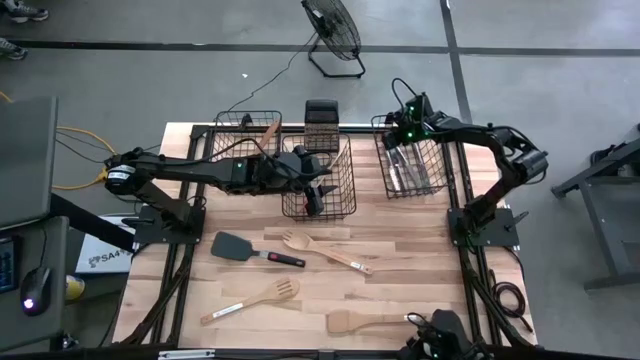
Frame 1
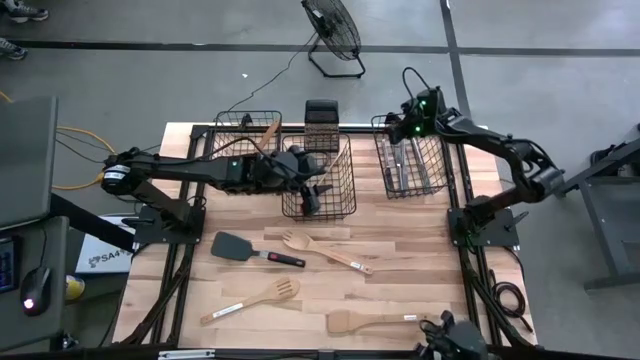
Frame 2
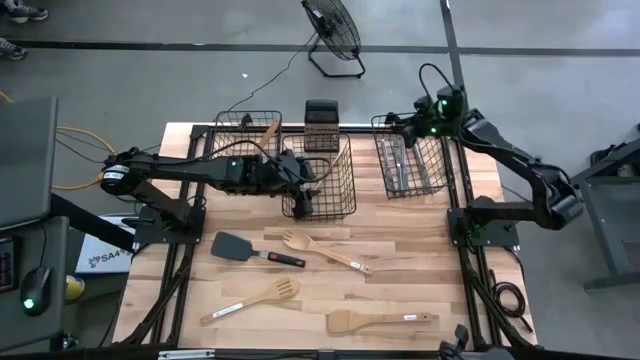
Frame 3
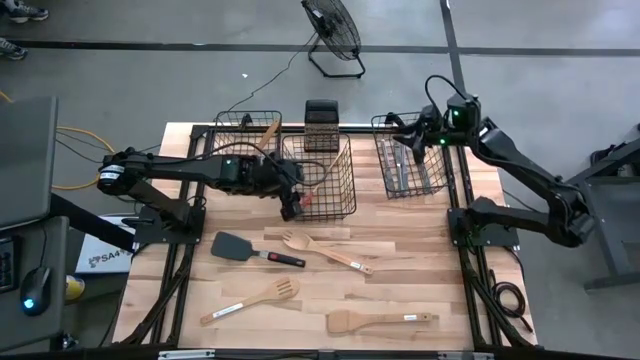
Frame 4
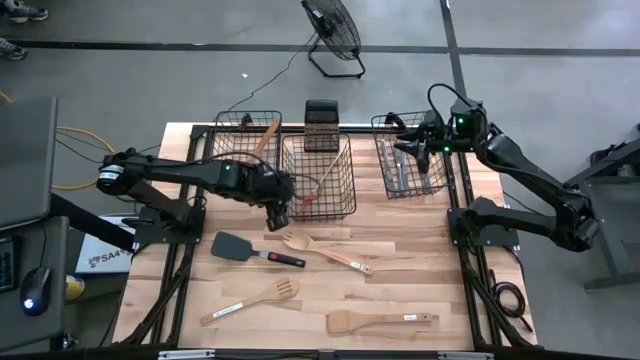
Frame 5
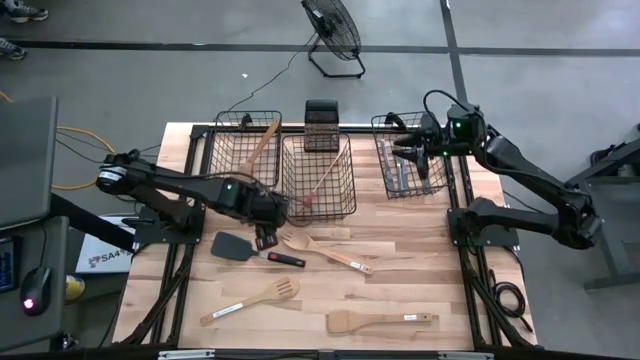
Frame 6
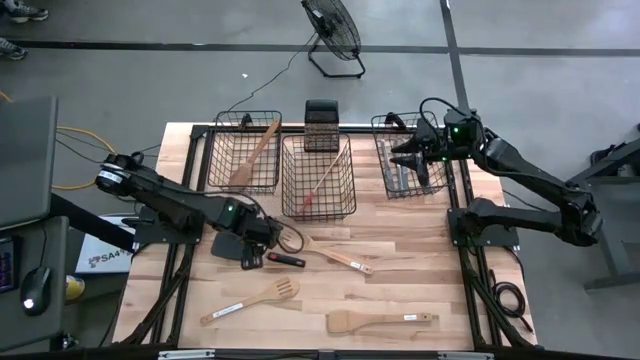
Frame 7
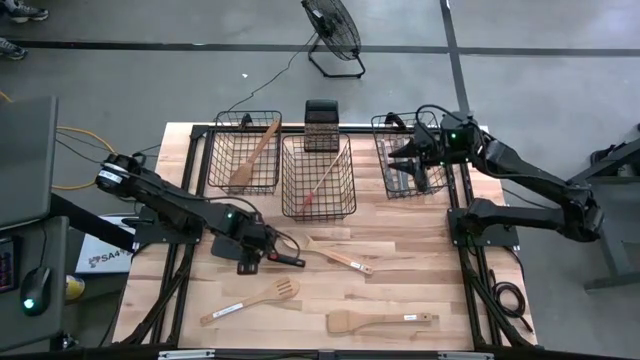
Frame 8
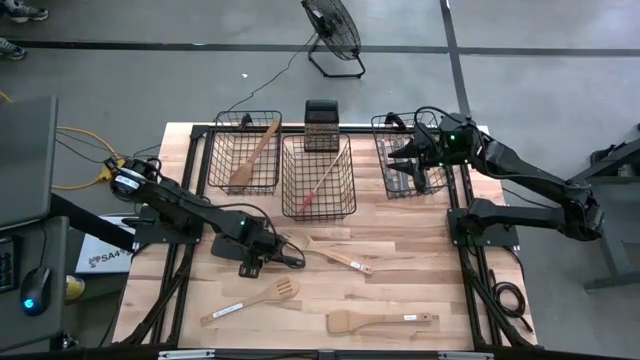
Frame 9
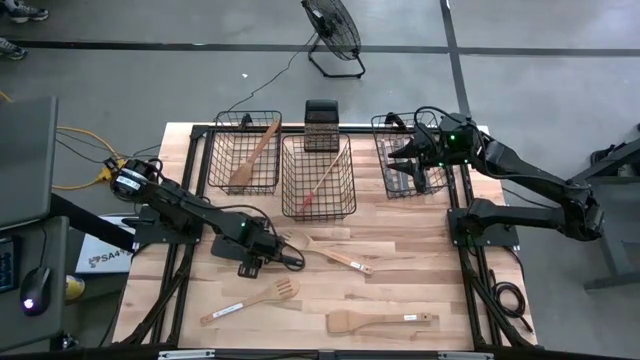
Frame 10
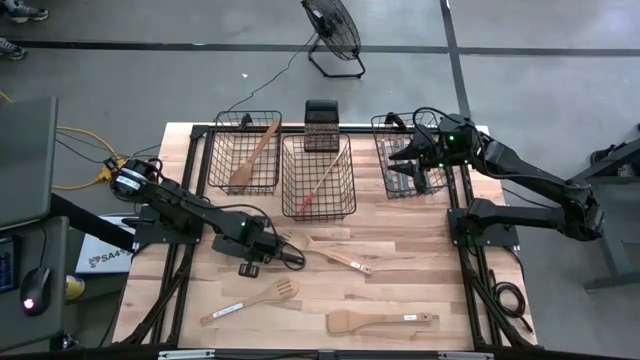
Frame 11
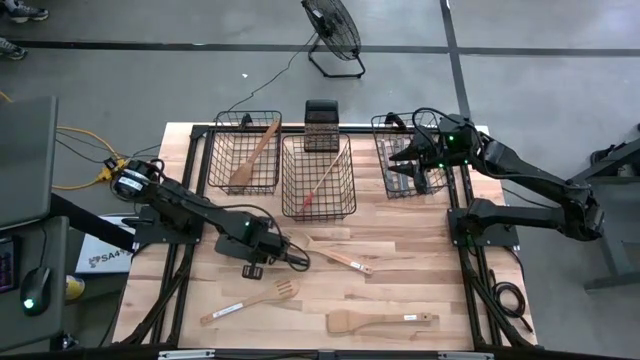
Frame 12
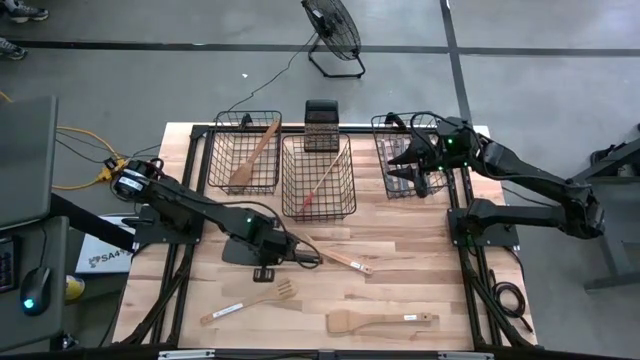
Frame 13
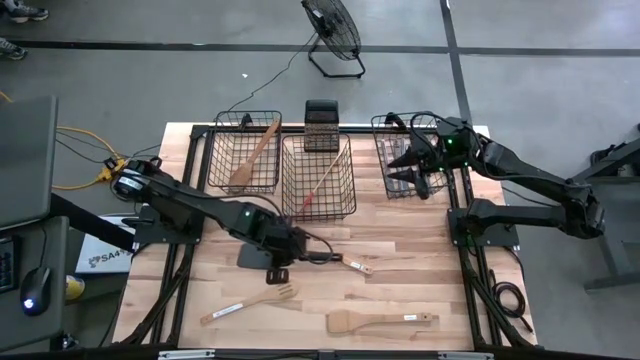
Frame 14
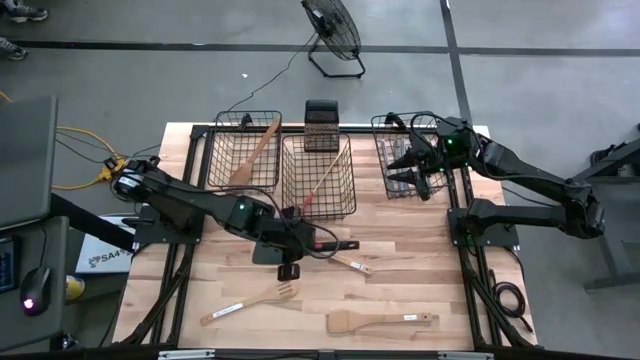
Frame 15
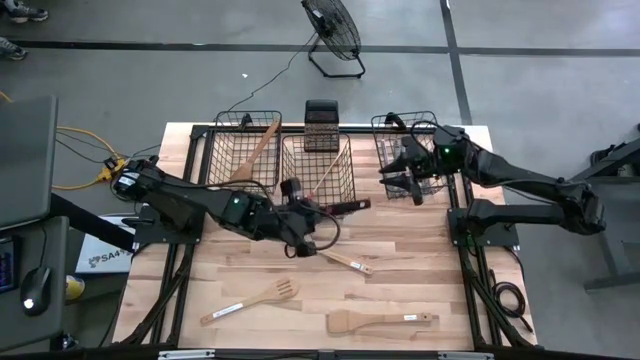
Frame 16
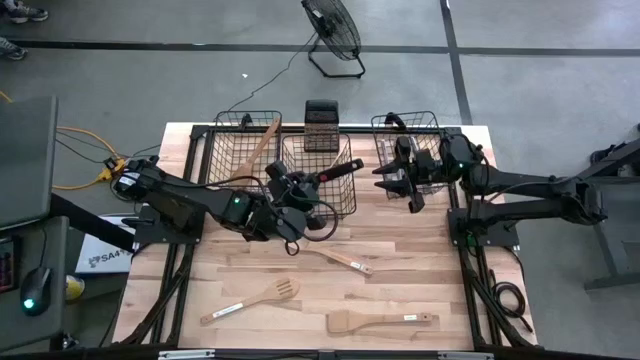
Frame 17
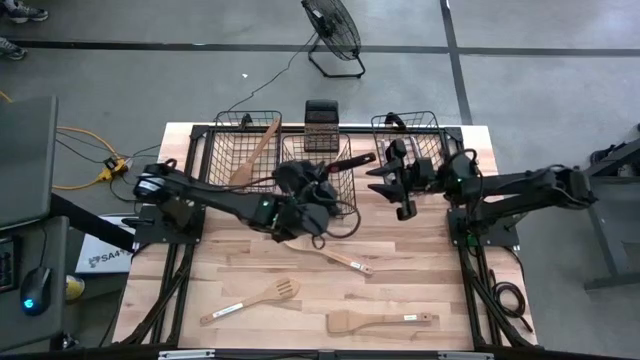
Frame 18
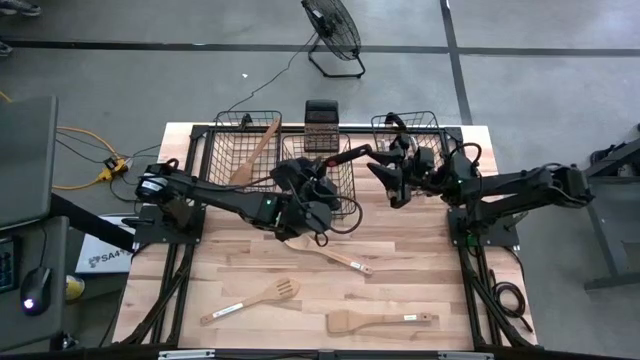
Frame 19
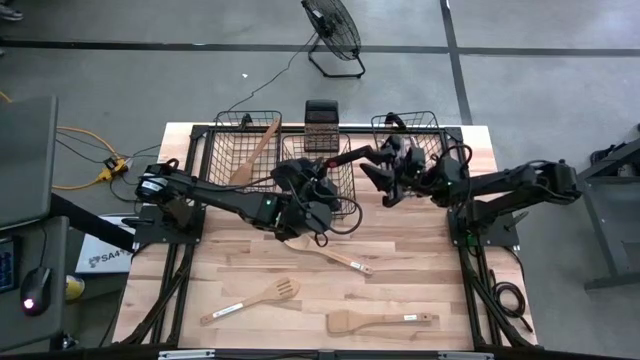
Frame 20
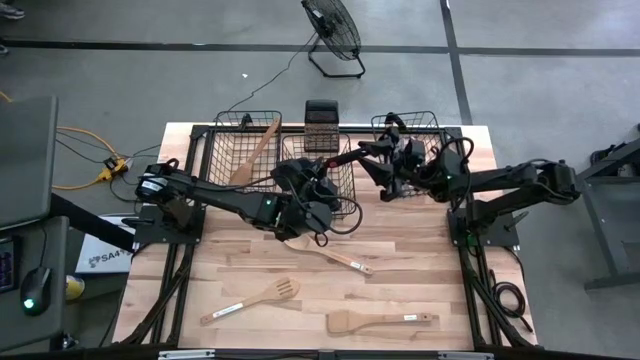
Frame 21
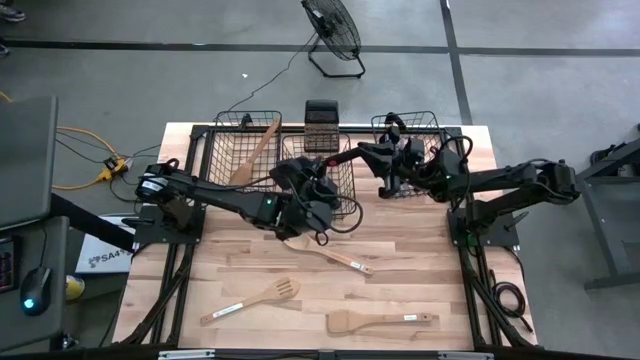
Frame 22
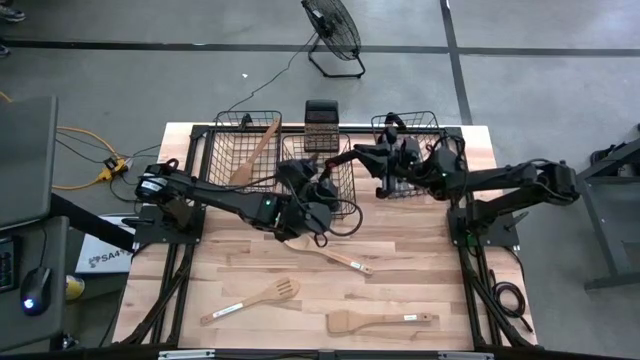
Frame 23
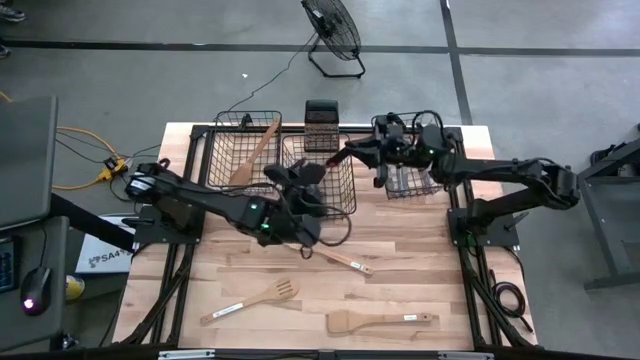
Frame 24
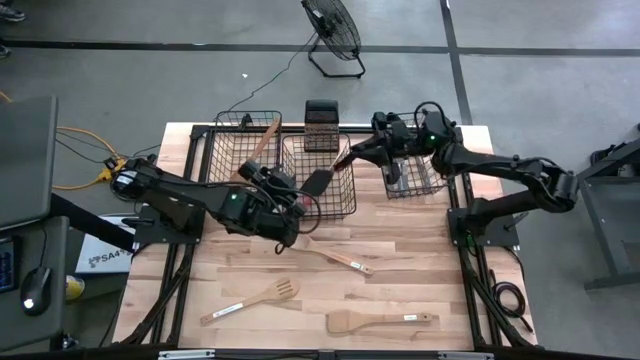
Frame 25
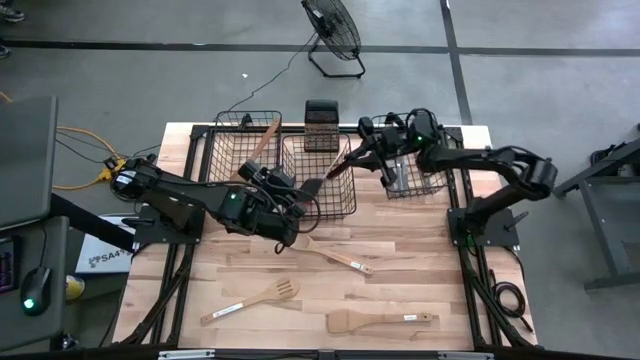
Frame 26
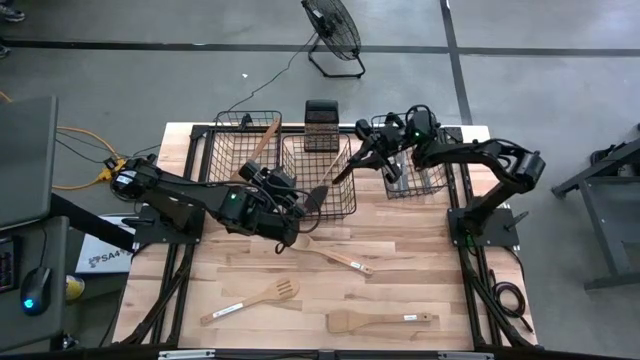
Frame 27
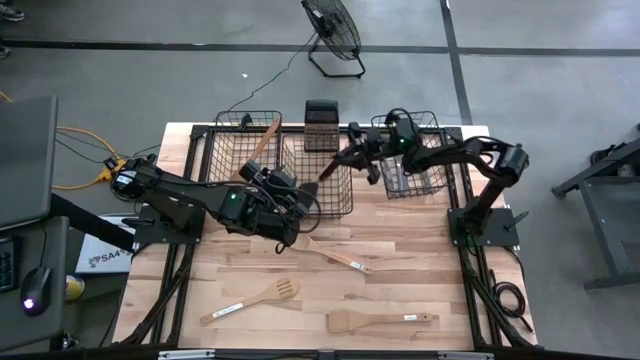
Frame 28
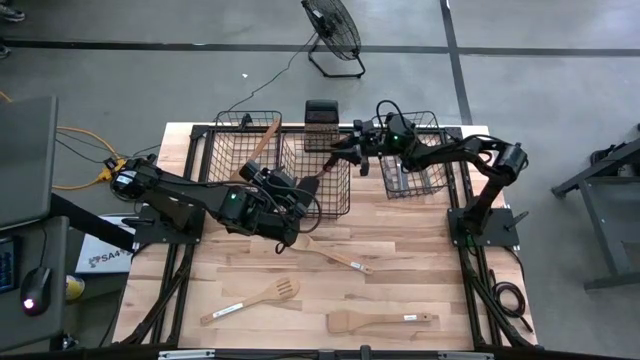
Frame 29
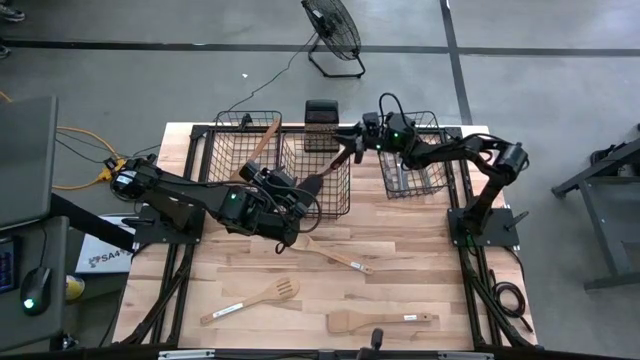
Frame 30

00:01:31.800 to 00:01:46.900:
Task: Pick & Place Kitchen Items
Put the black silicone spatula into the middle wire basket

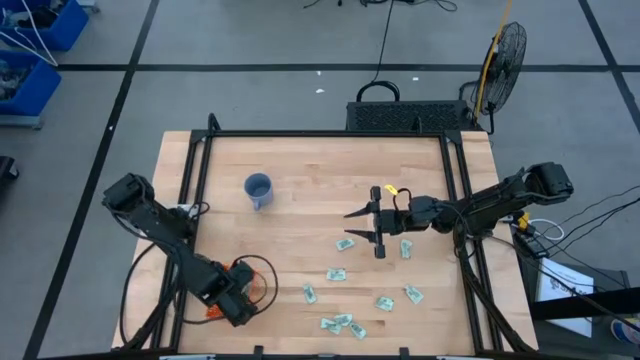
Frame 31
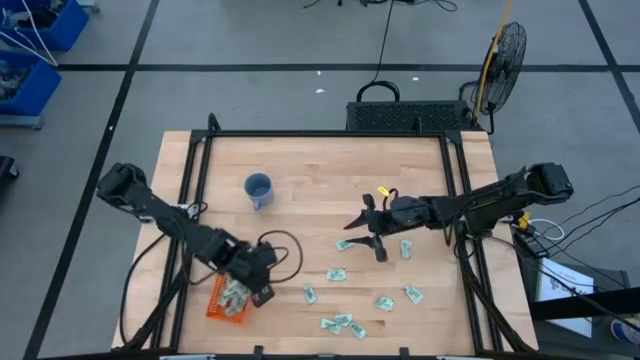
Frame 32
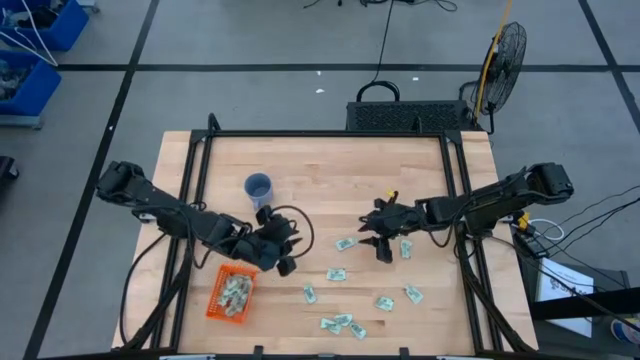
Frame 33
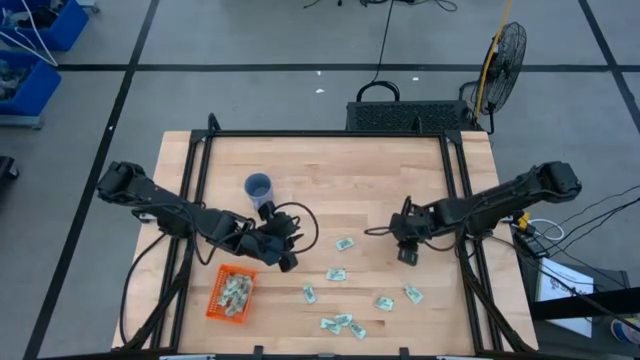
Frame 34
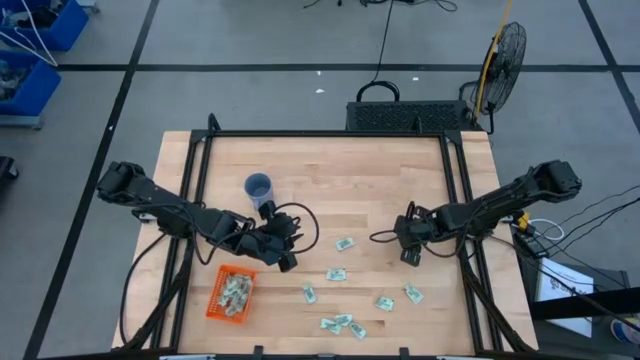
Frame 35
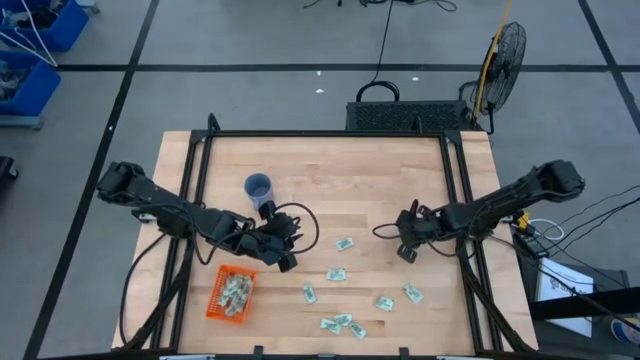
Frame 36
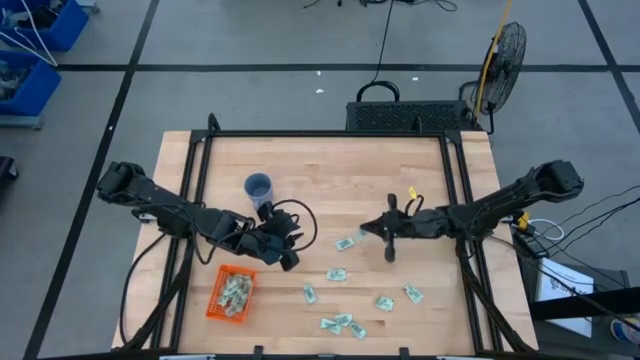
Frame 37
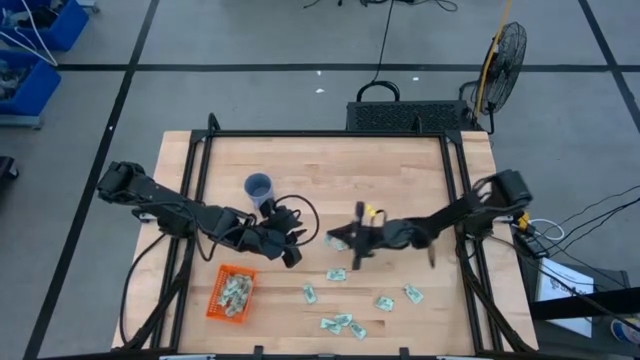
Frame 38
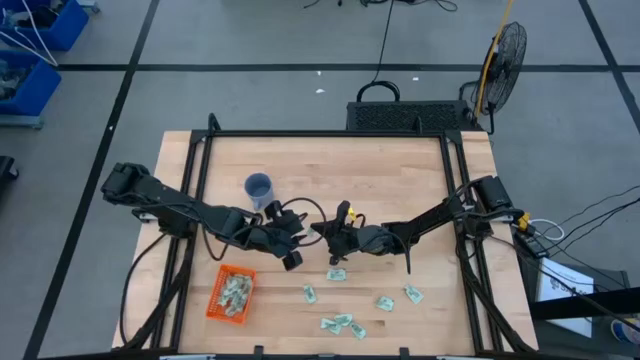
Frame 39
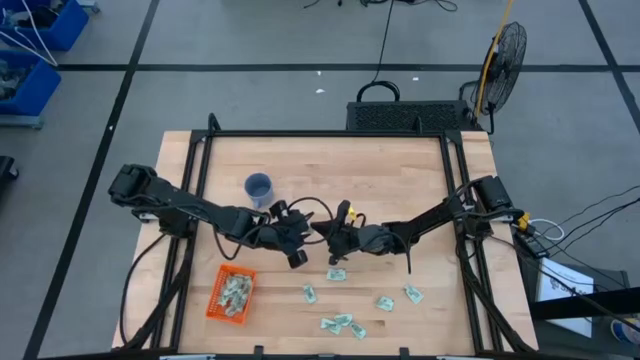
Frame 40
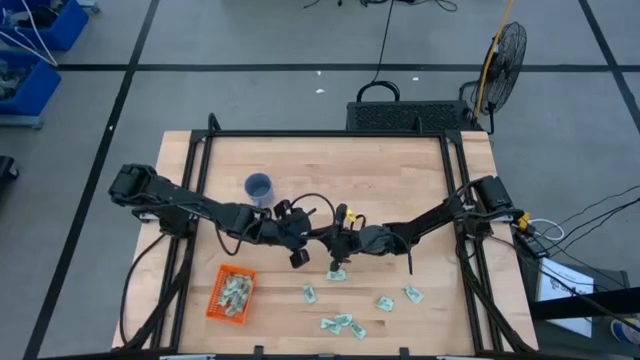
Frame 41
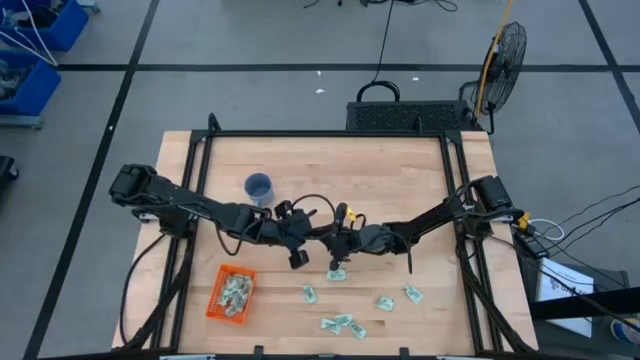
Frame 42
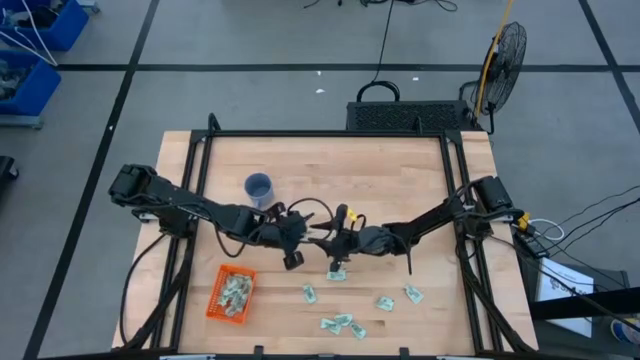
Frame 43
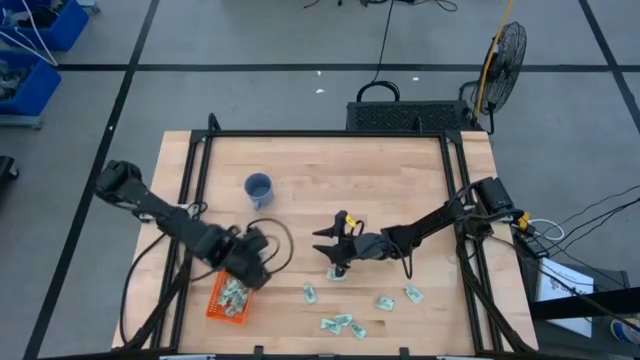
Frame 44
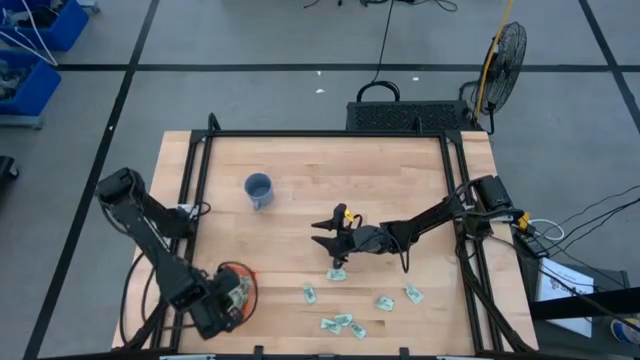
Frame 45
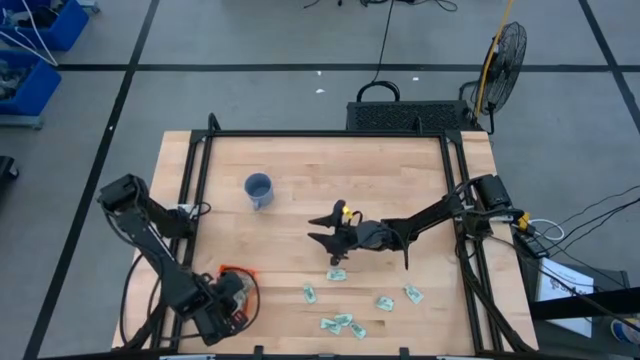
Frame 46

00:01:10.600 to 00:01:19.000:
Task: Pick and place Stevia / Truvia into bins
Put the stevia packet into the orange bin
